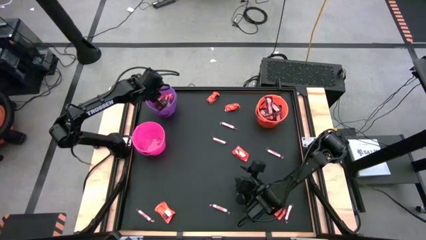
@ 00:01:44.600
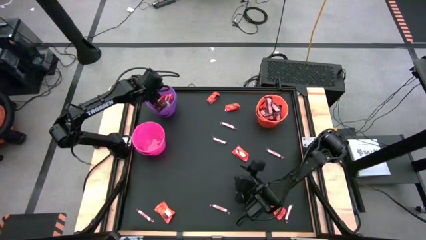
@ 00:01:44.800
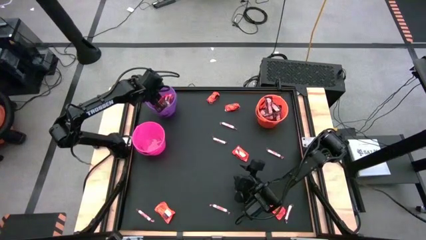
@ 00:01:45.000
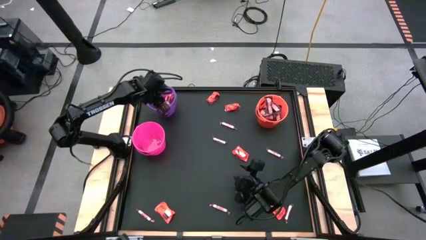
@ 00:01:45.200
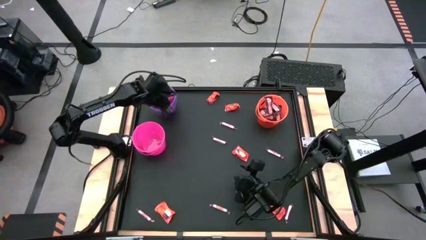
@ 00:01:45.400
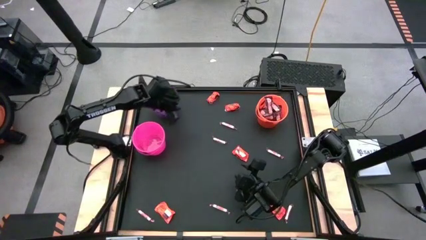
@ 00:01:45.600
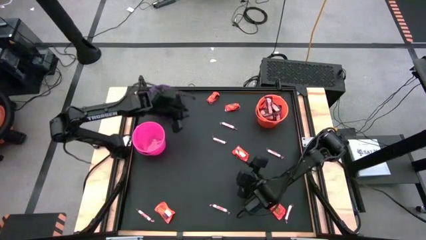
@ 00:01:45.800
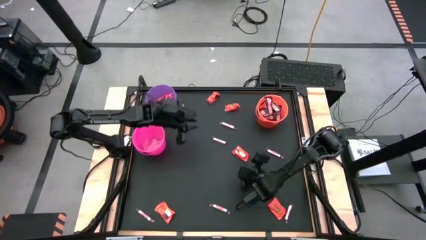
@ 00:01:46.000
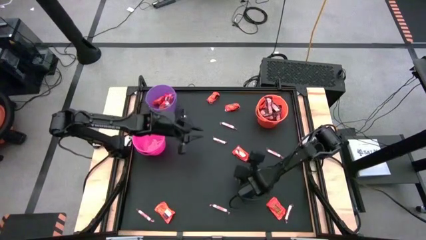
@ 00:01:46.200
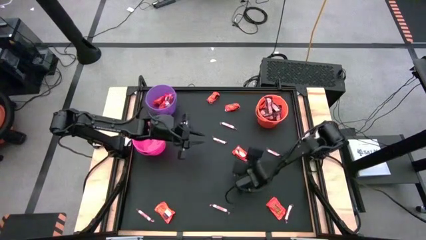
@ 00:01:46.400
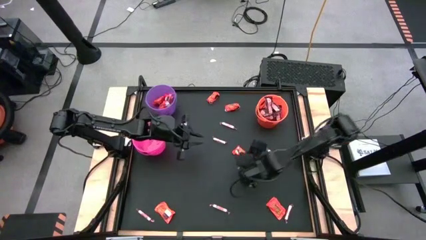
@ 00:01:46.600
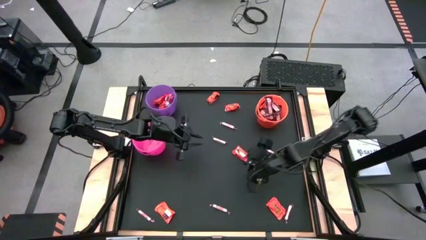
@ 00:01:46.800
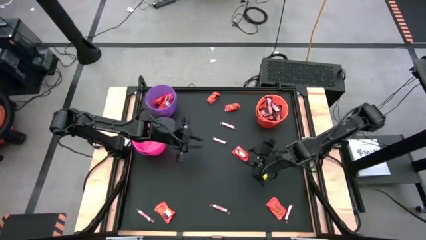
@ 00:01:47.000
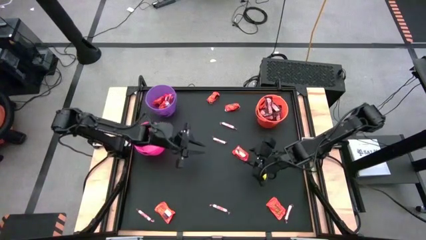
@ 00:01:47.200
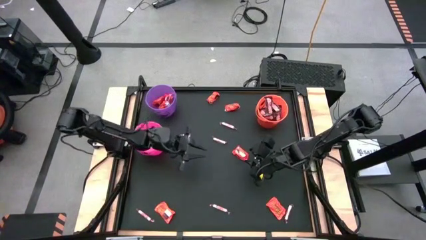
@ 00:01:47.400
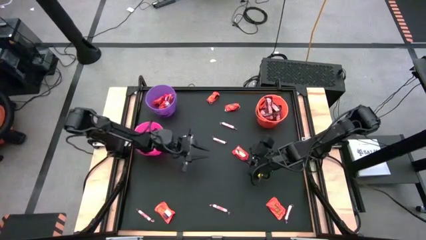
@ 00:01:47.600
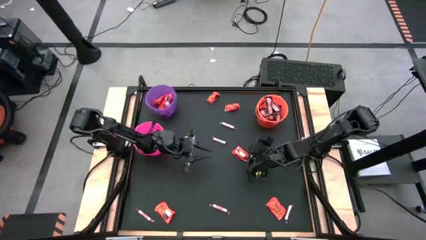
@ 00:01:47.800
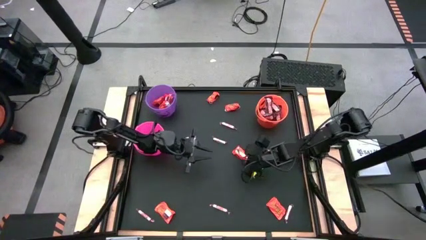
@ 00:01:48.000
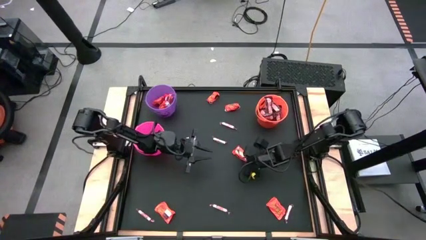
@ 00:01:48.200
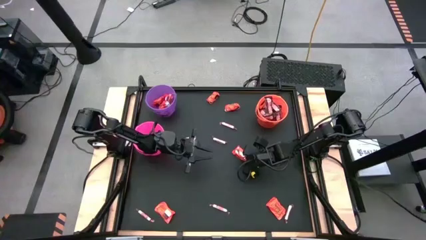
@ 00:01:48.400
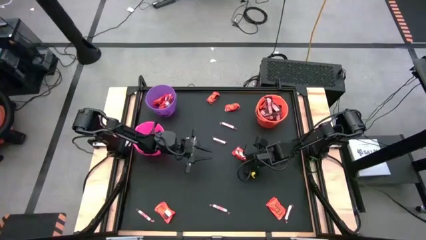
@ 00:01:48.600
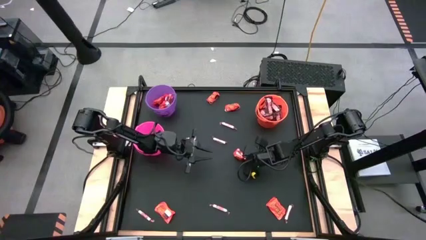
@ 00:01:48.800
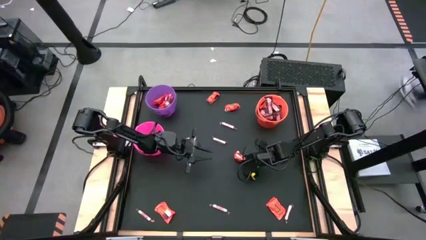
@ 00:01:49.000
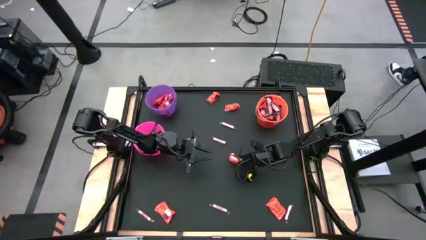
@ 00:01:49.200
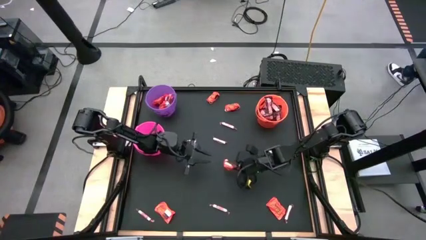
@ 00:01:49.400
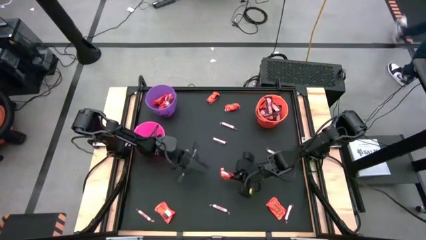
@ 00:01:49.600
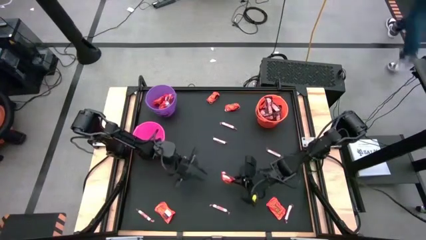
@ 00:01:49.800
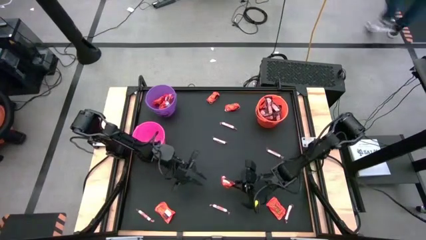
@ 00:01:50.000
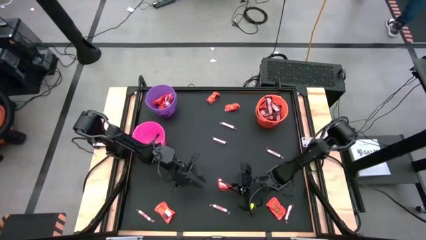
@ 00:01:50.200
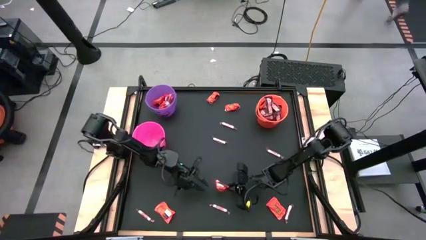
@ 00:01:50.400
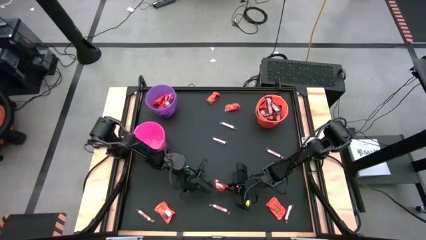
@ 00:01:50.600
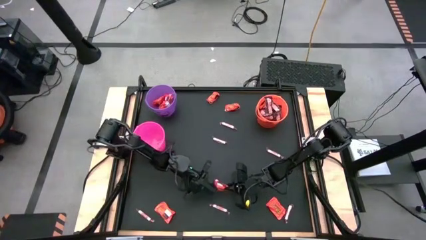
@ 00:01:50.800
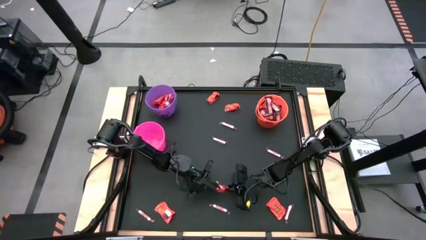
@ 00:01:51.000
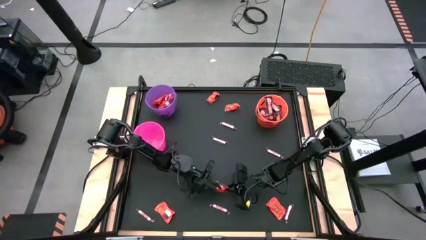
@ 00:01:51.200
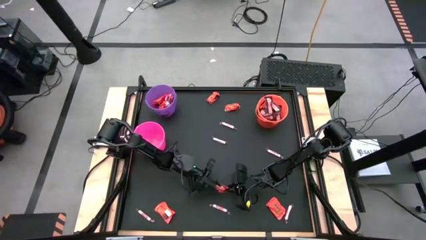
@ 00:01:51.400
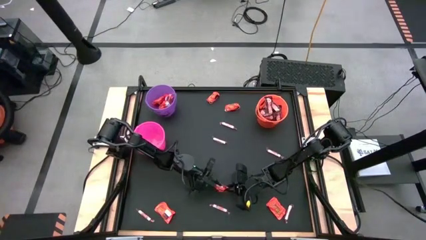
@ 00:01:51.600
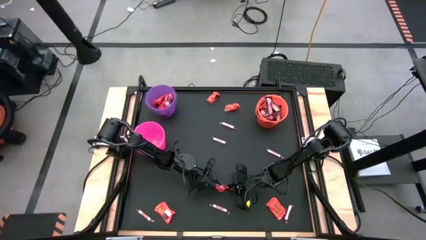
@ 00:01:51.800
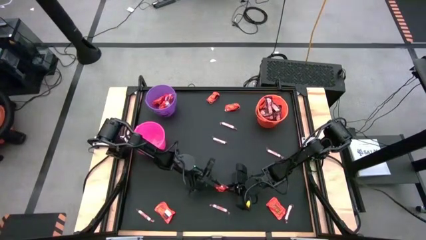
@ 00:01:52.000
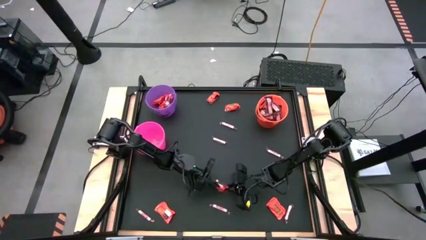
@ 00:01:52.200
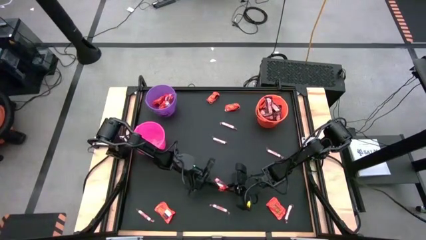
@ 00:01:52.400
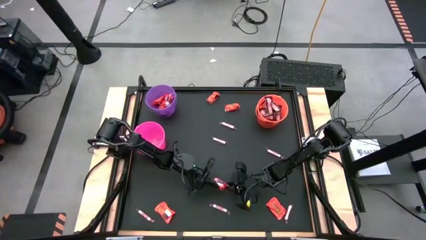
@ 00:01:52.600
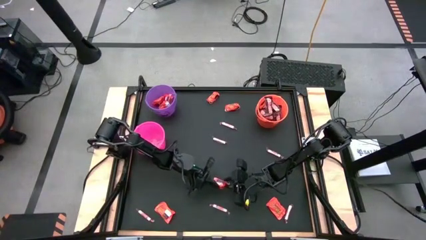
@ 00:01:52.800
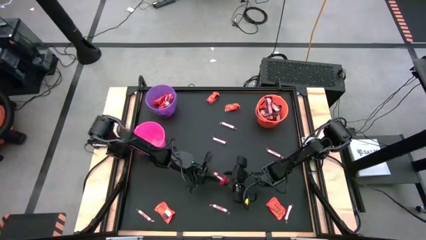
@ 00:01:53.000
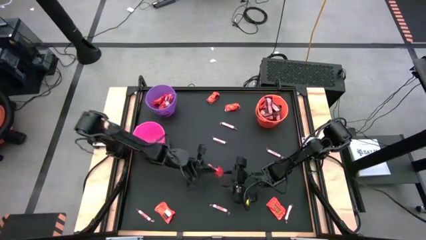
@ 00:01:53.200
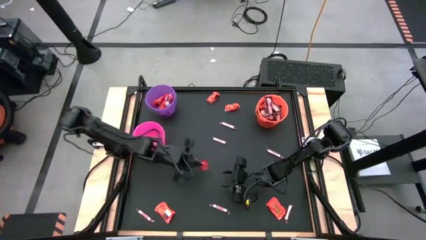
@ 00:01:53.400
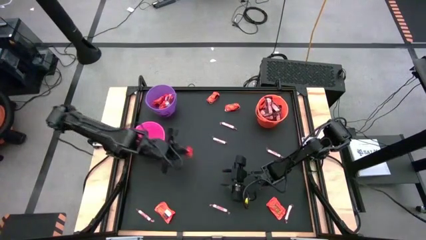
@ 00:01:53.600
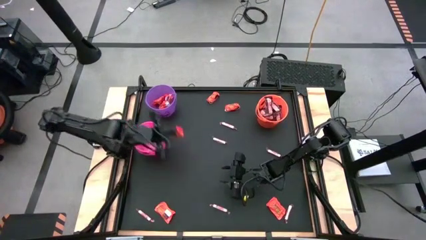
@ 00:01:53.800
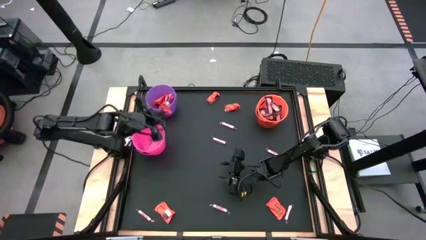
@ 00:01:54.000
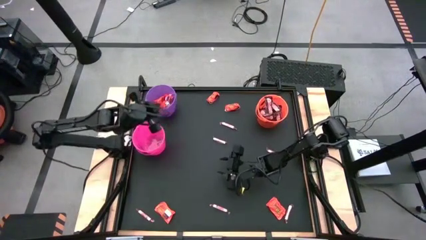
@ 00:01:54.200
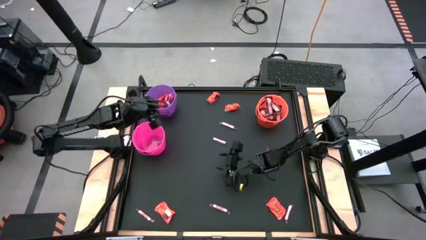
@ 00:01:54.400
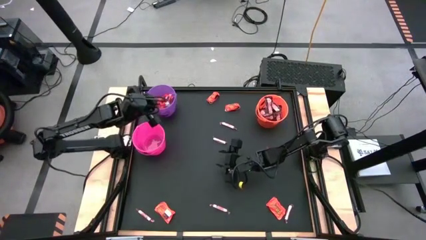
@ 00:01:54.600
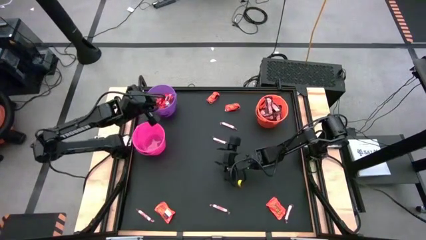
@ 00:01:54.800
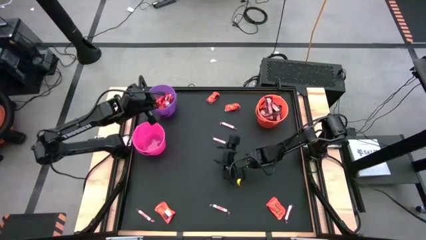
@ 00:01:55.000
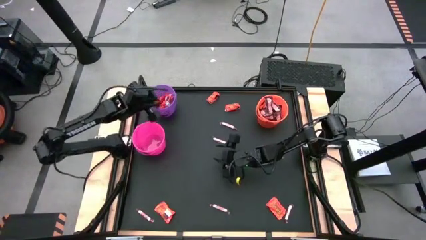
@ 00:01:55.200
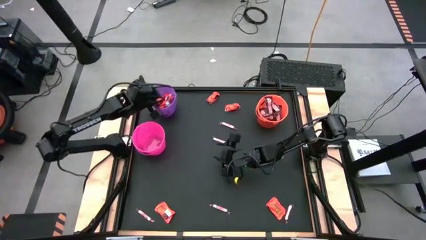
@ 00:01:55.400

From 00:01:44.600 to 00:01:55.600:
Task: Sort candy by brand, put in halloween buckets
Put the orange candy into the purple bucket

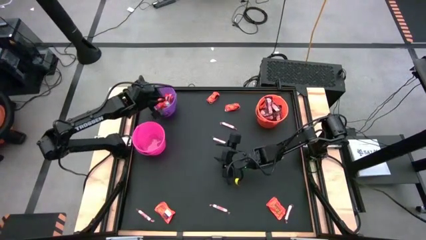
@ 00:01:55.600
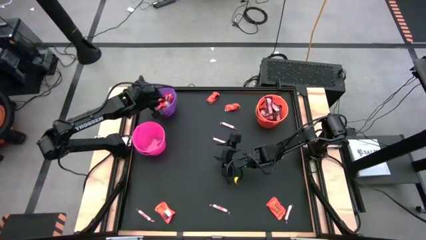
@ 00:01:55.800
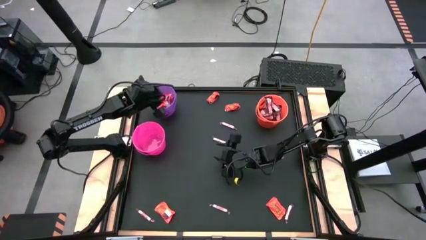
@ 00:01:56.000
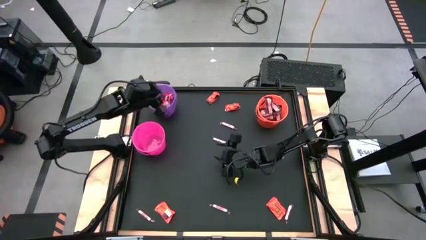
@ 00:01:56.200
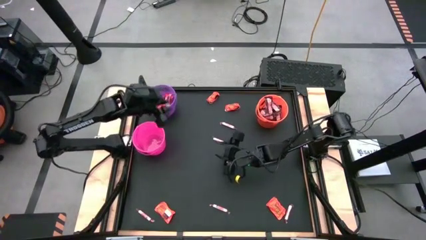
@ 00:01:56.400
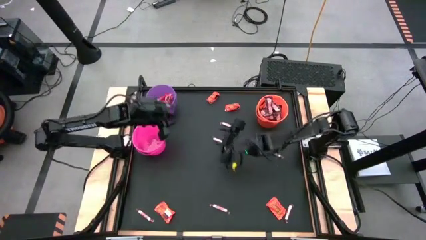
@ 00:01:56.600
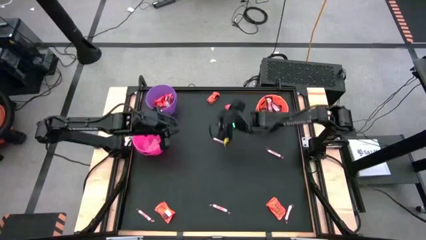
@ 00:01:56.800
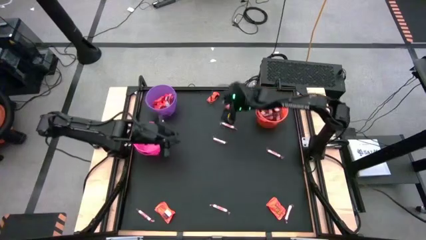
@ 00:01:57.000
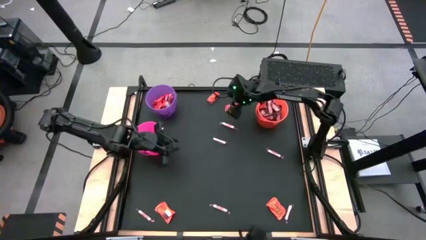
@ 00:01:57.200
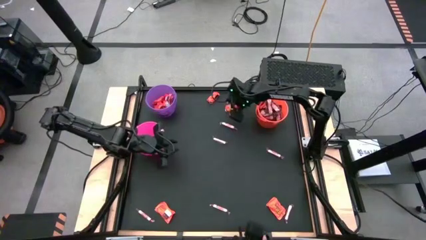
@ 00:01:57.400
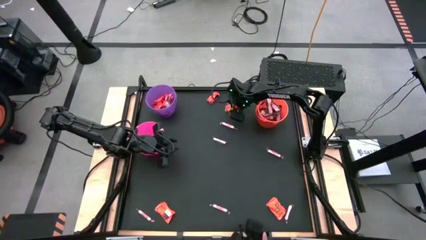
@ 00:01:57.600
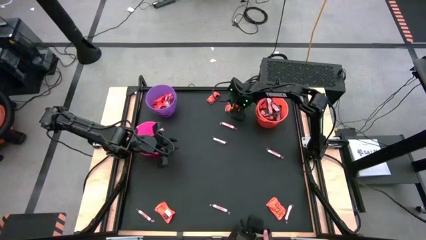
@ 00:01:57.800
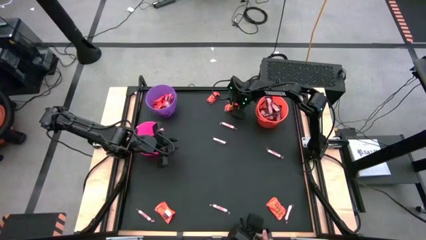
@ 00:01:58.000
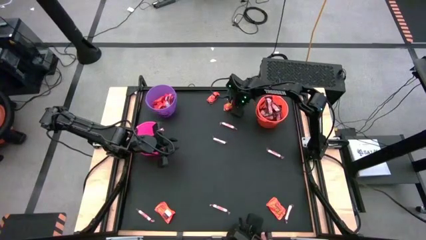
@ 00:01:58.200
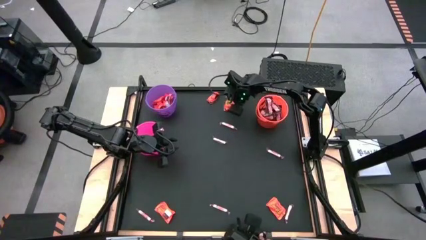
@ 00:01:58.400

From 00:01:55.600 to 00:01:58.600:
Put the orange candy into the purple bucket

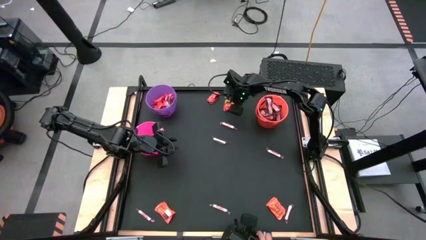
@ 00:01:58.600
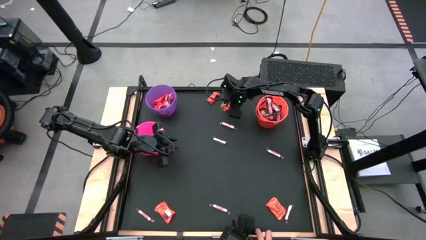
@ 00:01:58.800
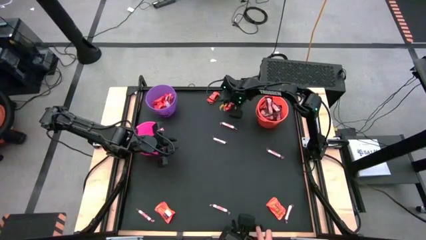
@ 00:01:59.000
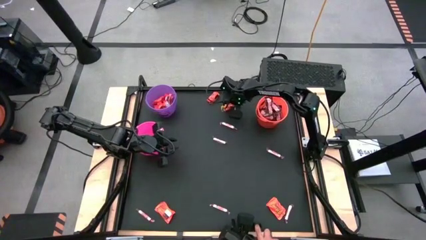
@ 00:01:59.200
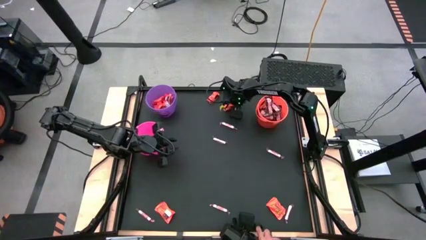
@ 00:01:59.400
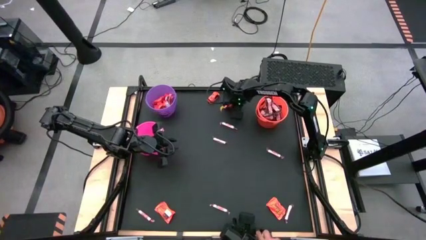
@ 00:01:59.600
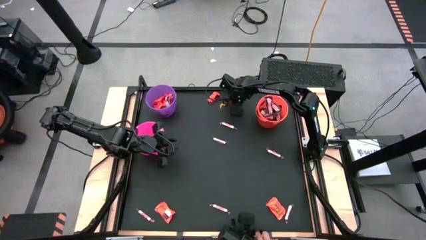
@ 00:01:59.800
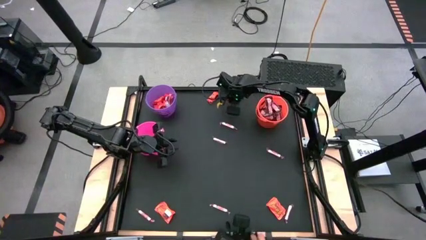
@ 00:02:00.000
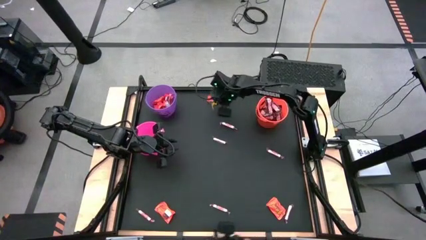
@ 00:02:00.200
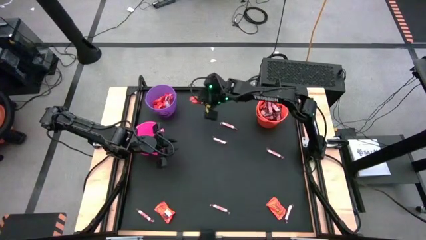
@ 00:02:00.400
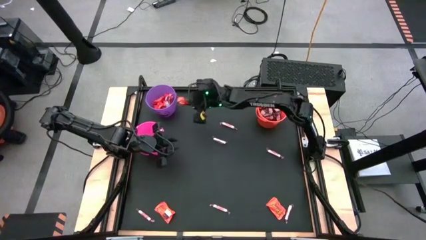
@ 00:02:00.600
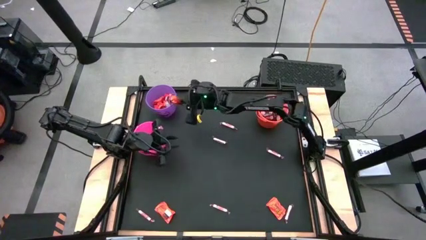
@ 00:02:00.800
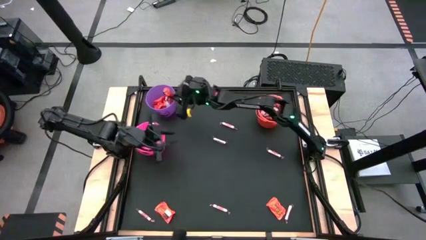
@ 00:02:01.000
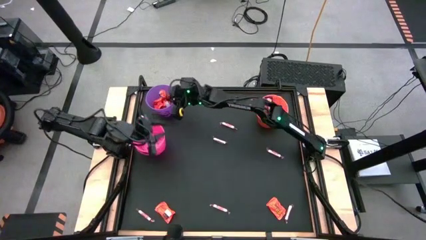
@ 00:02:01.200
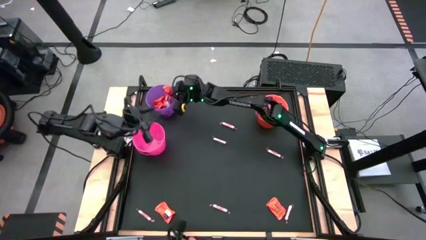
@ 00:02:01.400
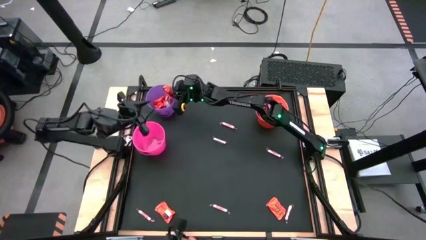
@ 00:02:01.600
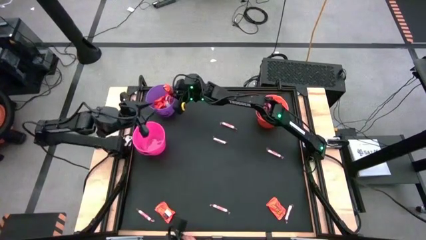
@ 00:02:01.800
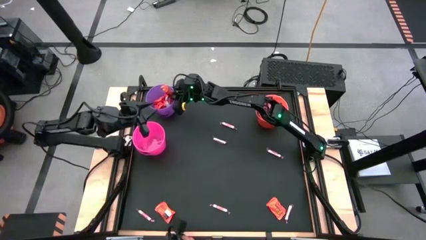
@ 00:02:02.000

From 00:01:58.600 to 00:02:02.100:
Put the orange candy into the purple bucket
